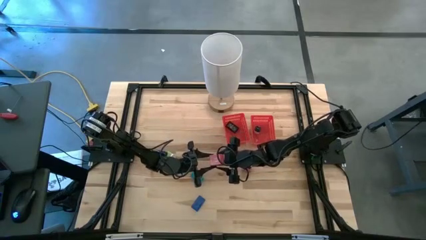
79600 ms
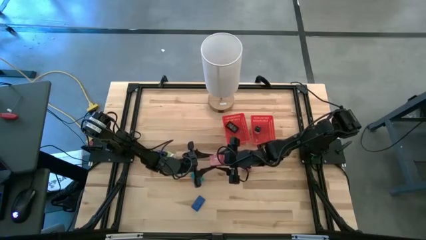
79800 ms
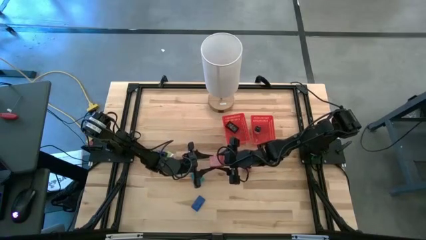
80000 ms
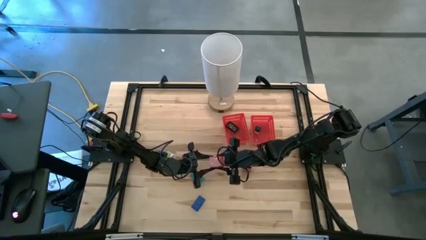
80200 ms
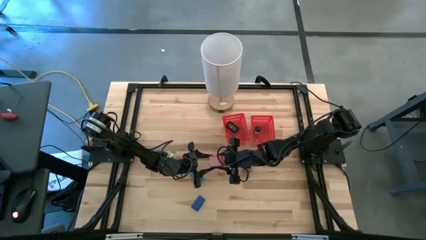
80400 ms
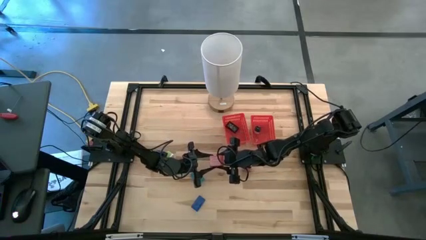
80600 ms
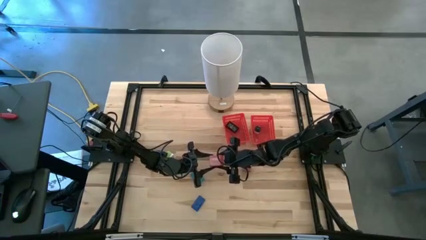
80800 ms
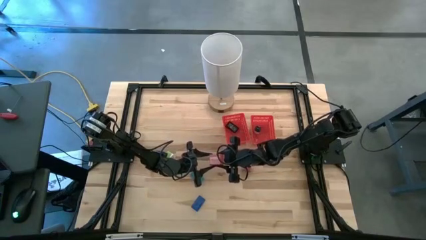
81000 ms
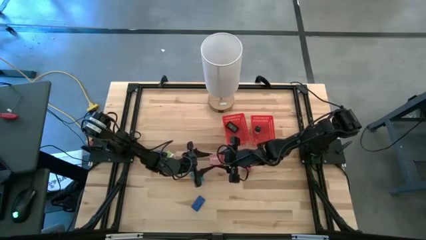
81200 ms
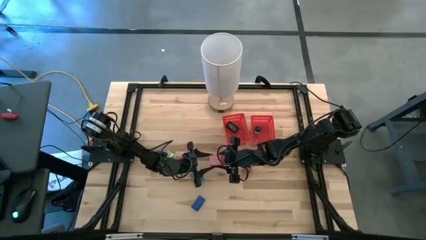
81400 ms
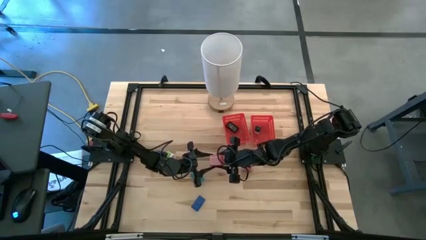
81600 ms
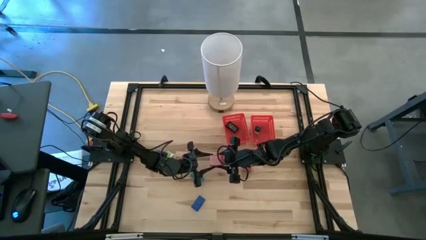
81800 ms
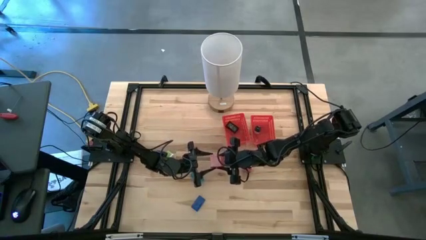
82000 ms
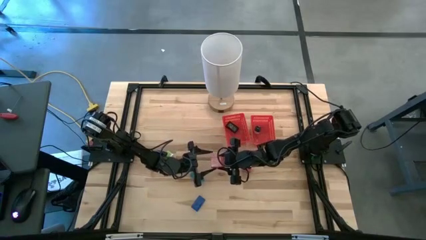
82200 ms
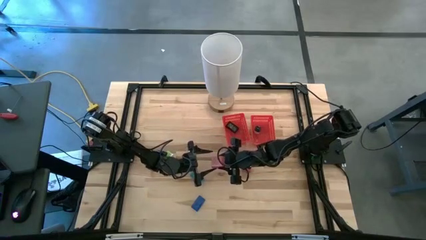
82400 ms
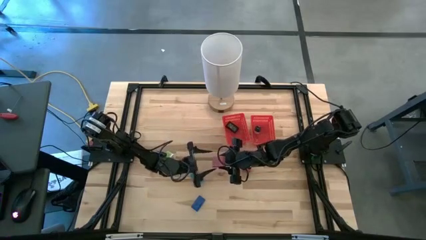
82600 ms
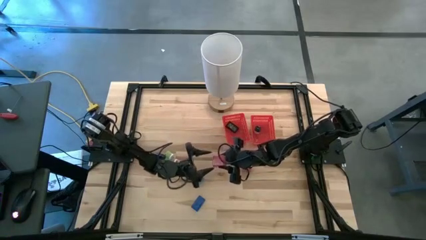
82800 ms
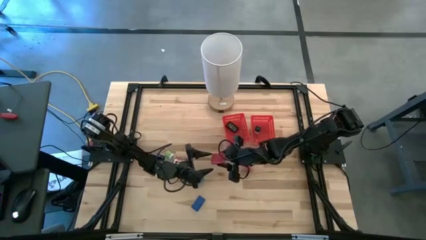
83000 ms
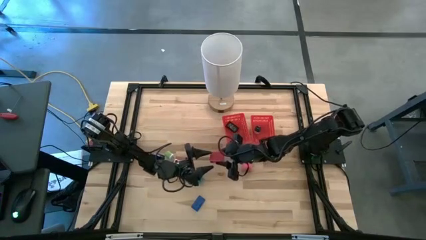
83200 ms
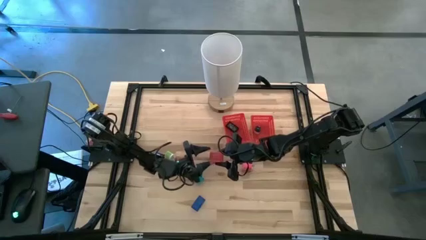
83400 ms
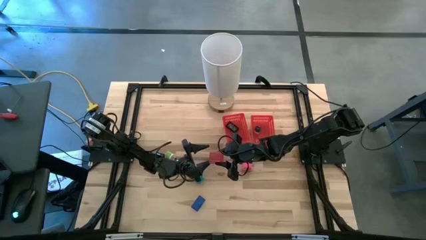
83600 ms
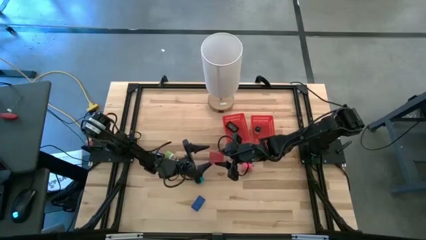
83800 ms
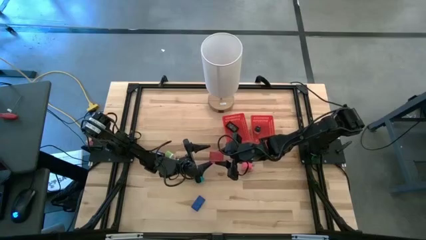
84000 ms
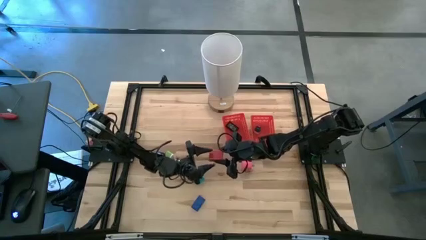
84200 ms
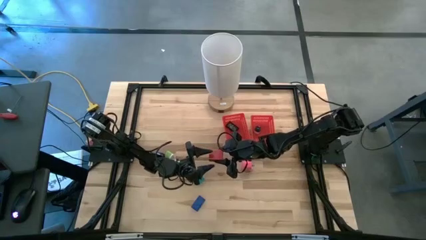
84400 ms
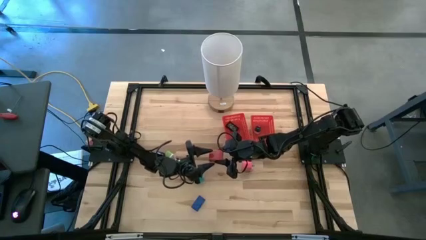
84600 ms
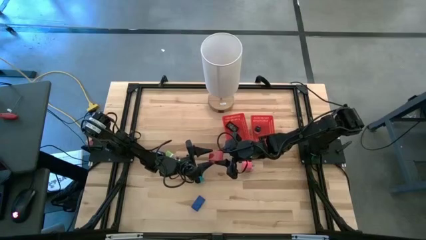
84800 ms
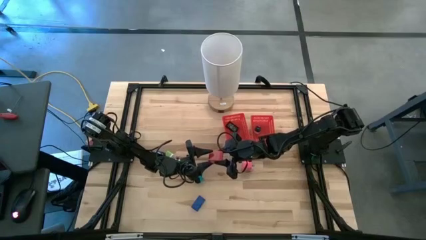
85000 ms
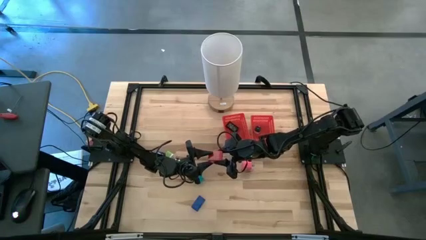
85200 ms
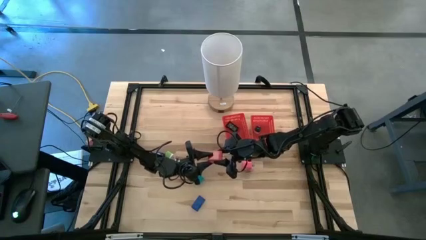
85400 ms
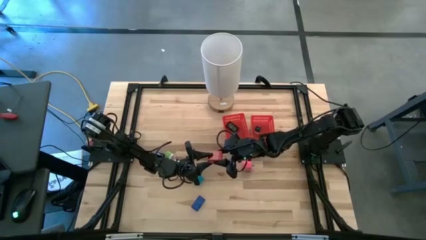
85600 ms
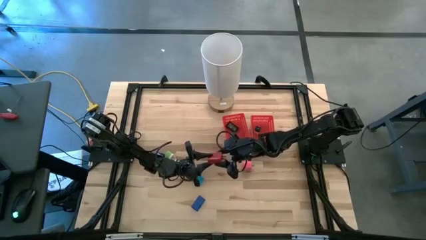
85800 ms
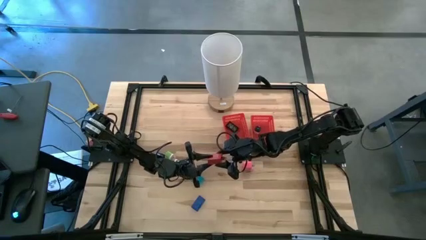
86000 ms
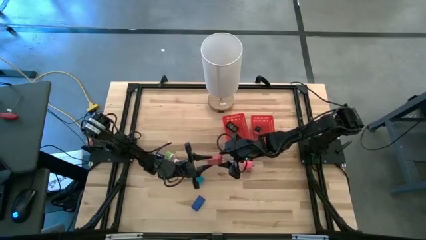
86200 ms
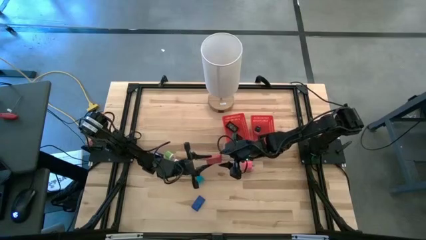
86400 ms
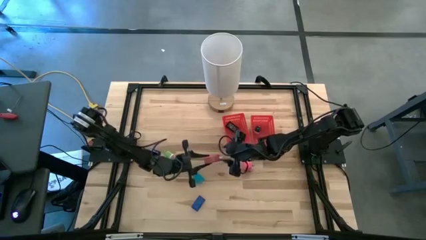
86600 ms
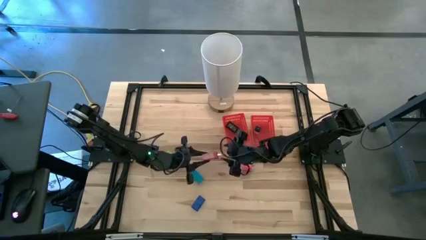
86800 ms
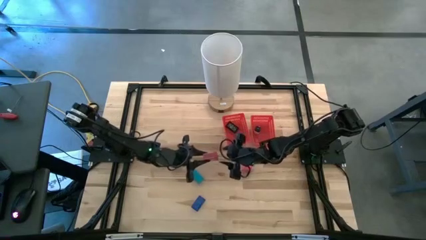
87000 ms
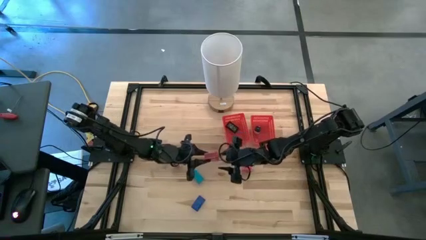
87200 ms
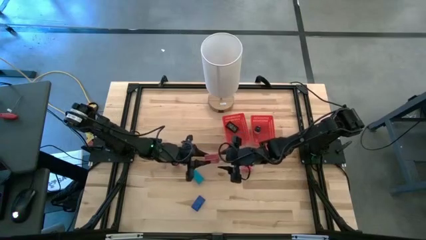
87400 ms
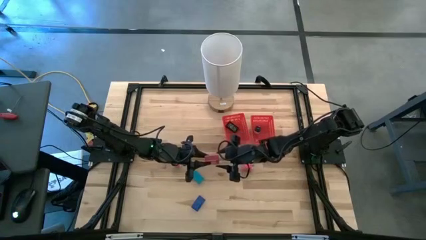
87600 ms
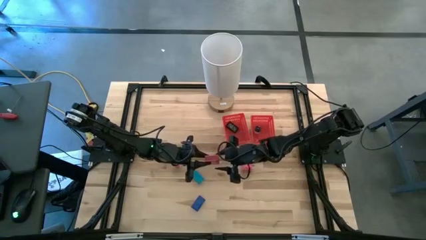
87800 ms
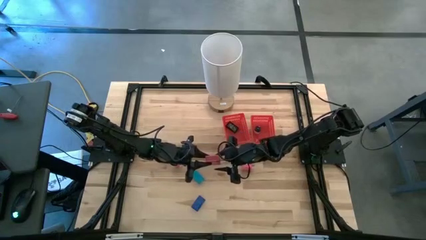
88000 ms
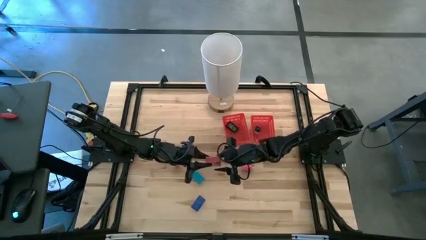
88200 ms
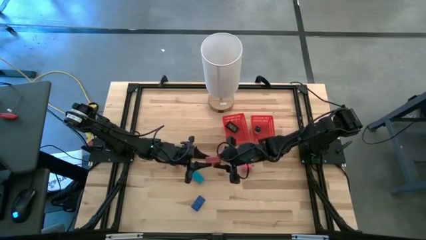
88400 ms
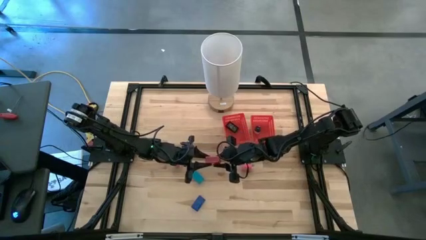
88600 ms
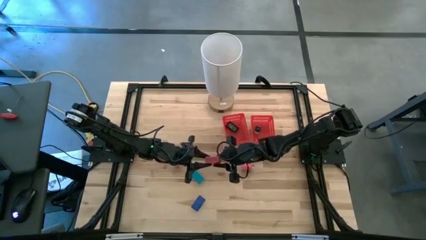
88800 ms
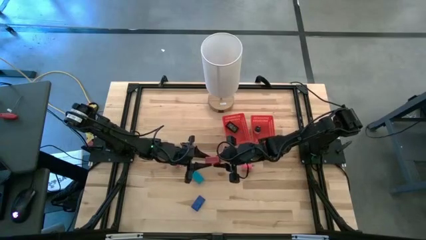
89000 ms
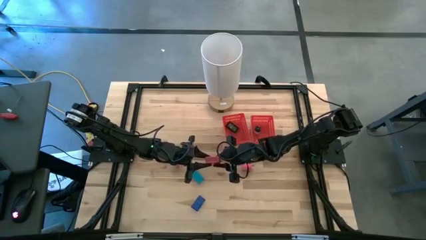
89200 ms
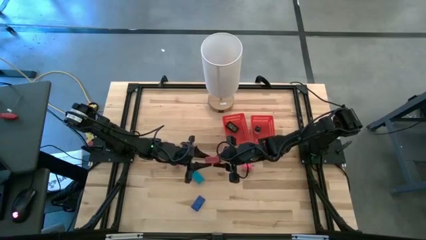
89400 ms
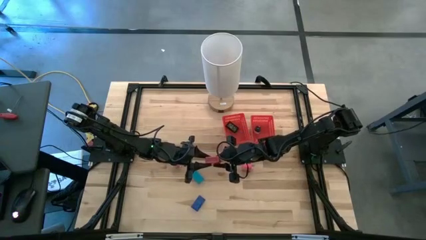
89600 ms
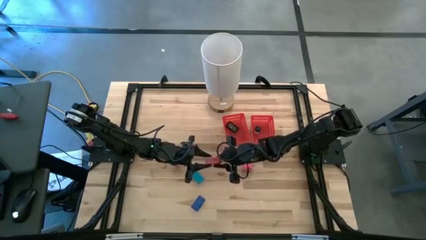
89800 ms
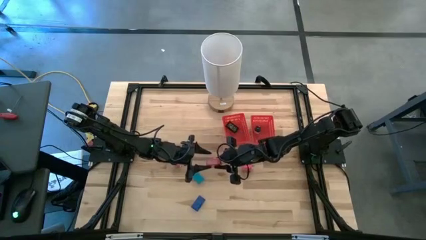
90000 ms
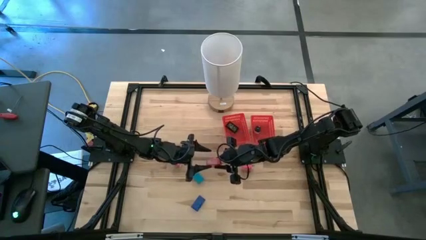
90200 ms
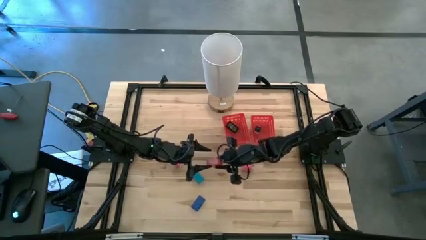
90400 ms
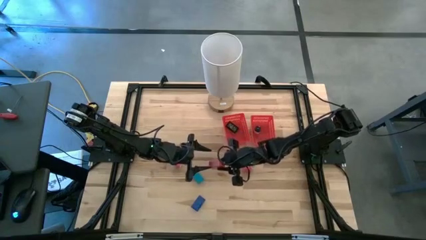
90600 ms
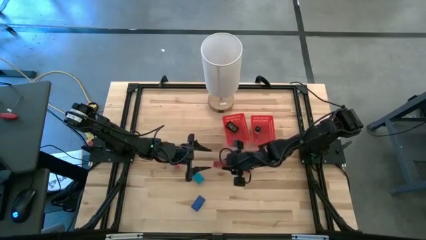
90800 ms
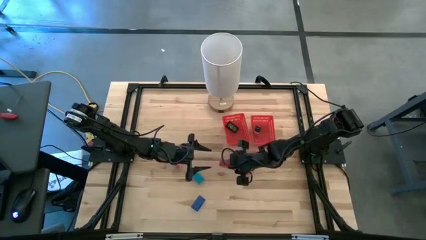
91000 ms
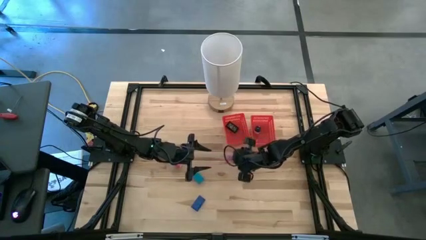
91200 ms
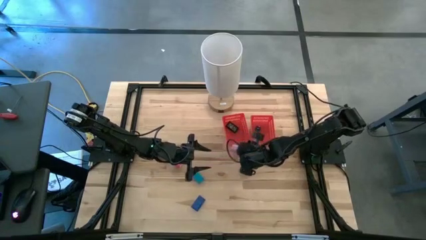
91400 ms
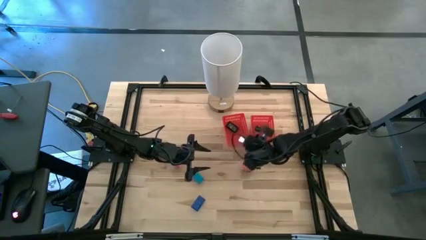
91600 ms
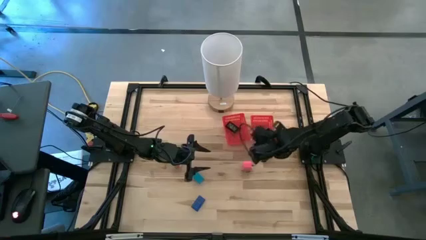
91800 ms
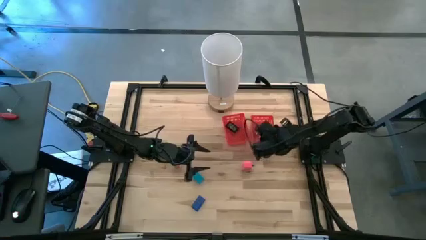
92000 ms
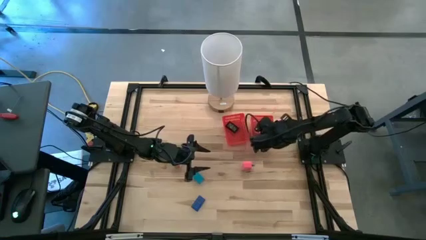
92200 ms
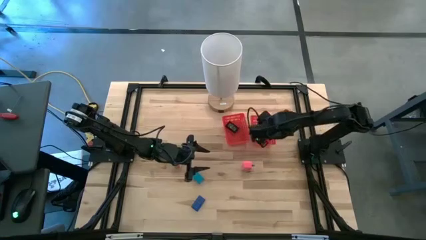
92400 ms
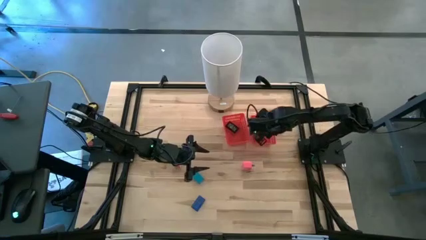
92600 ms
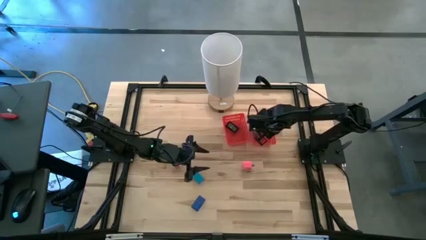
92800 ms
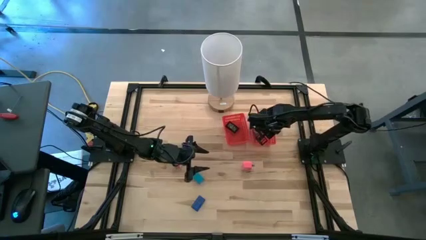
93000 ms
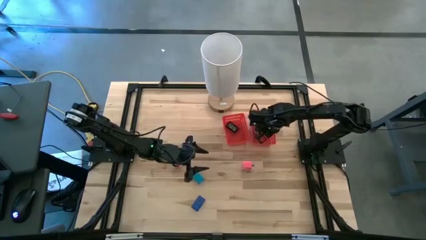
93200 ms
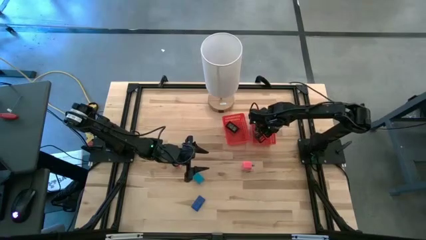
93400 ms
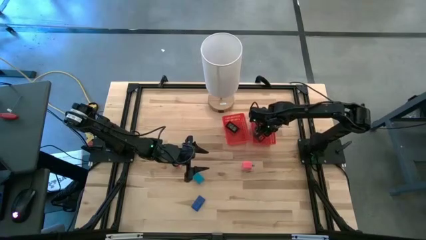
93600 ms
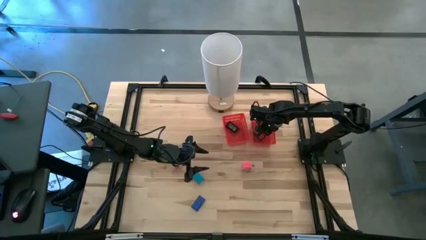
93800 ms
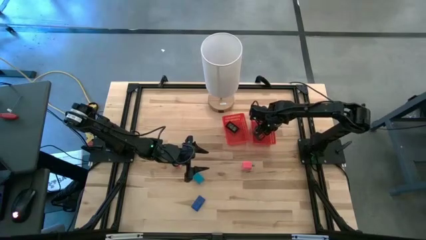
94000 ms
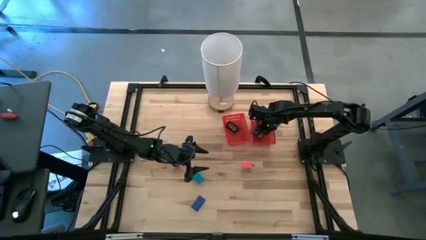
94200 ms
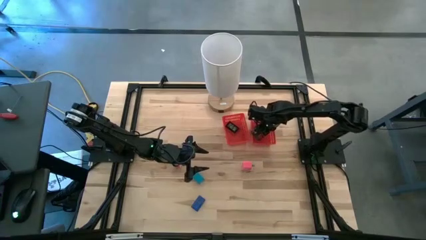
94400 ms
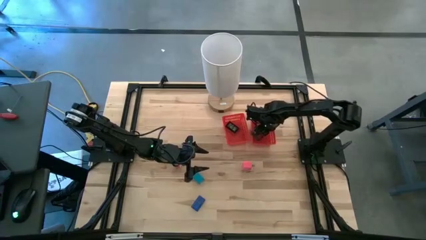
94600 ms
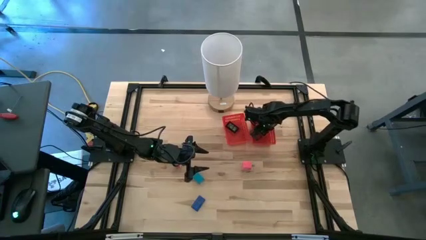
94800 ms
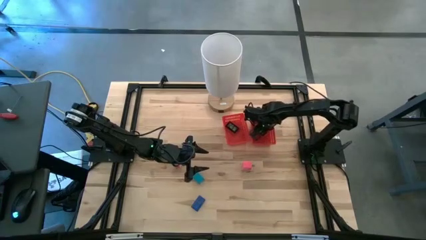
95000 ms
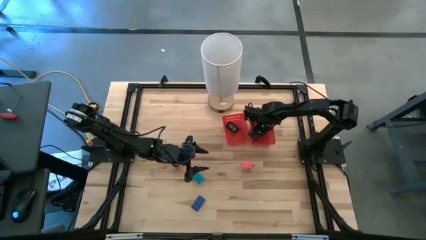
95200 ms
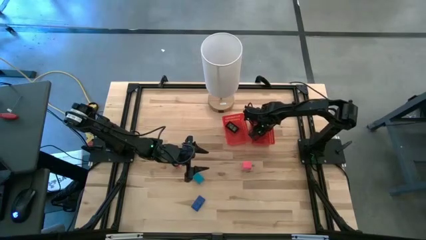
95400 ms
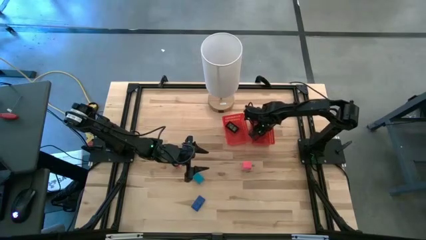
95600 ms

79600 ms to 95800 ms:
Task: Pick & Place Office items
Put the red charger adapter into the right red bin

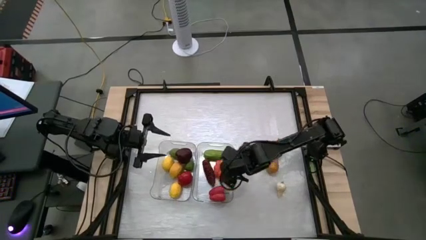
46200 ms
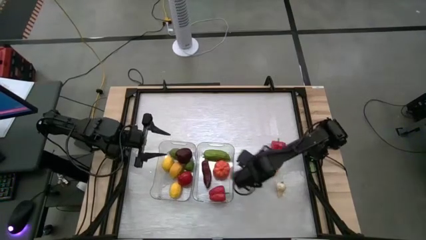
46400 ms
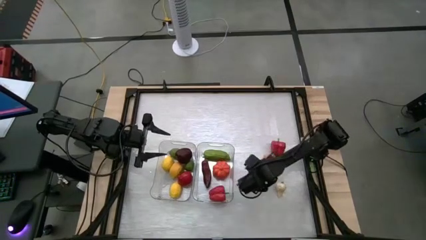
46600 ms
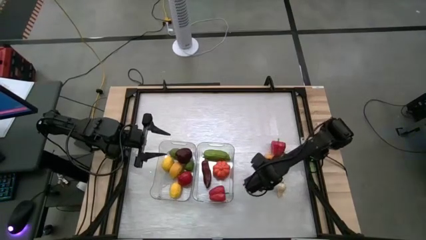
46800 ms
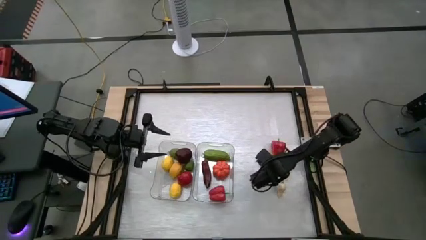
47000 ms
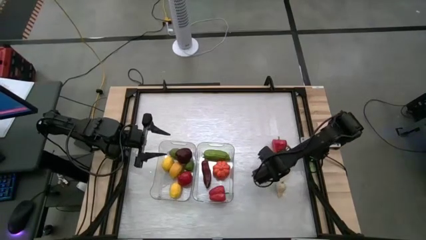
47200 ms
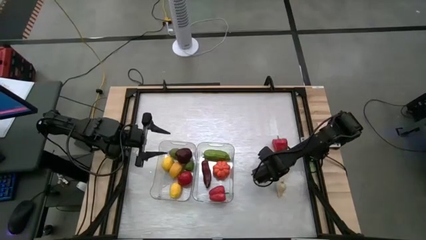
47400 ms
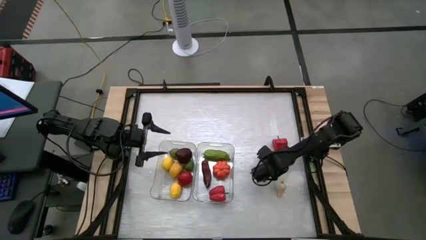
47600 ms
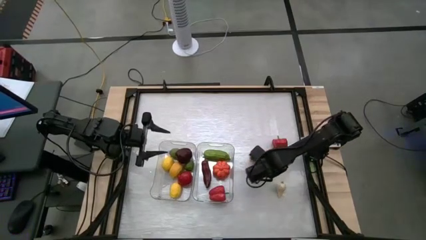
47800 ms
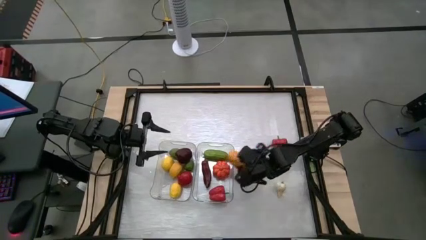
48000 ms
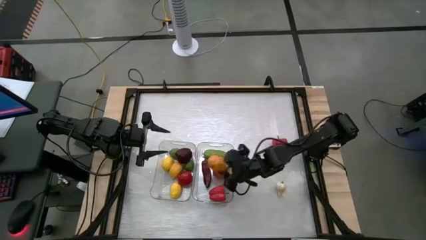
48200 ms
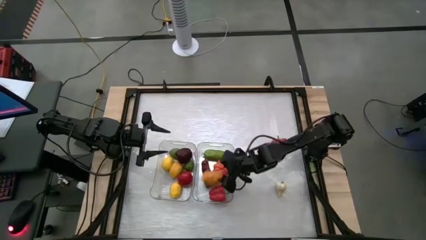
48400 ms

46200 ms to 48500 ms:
Task: Sort produce into baskets
Put the mango into the right transparent bin
